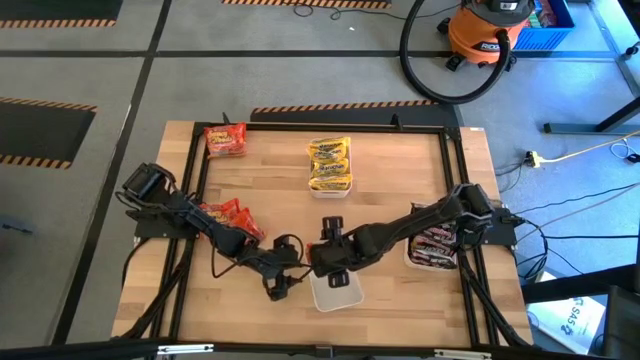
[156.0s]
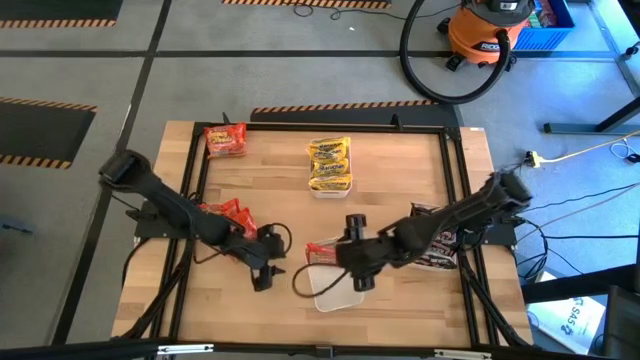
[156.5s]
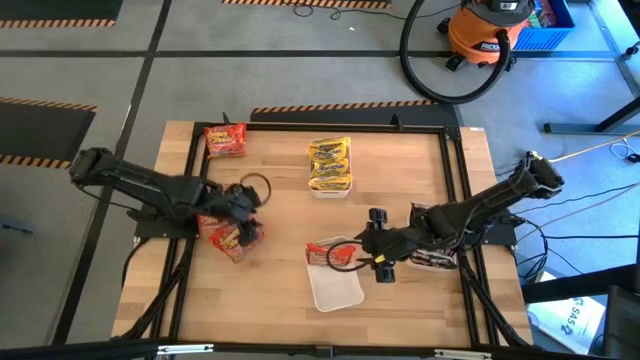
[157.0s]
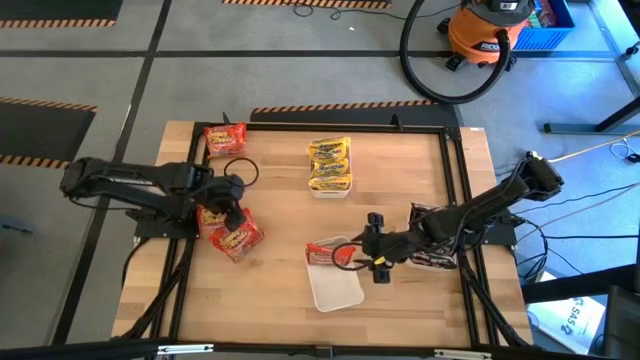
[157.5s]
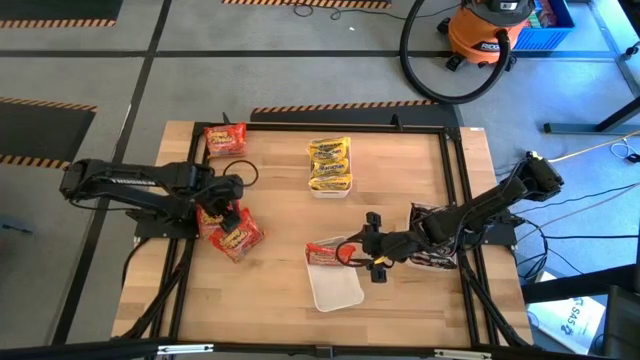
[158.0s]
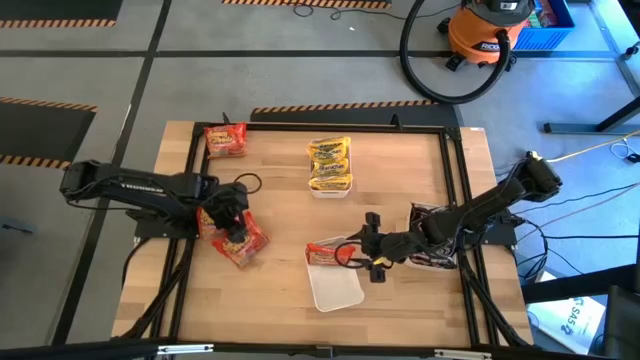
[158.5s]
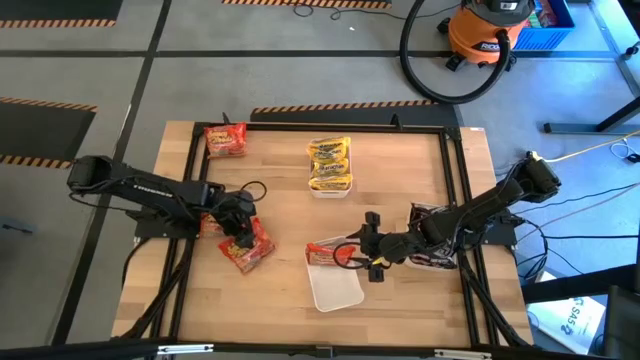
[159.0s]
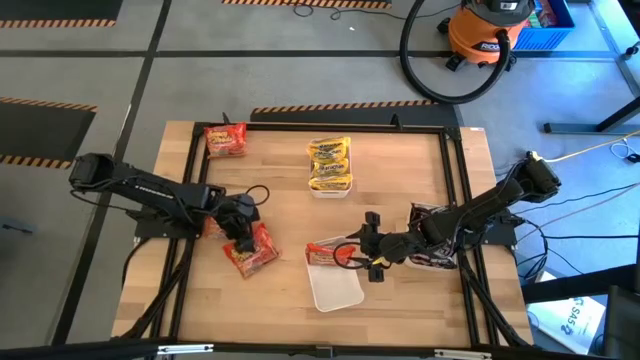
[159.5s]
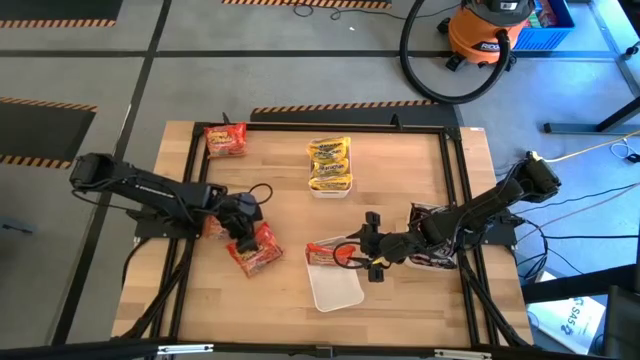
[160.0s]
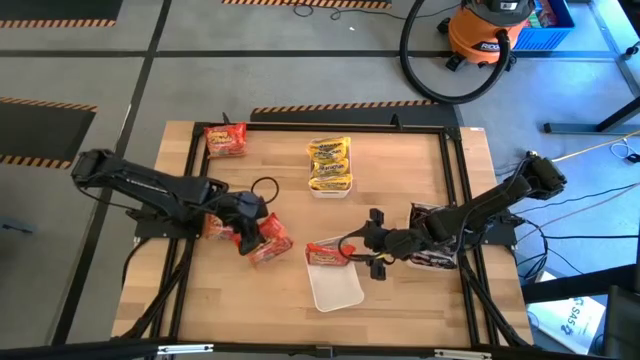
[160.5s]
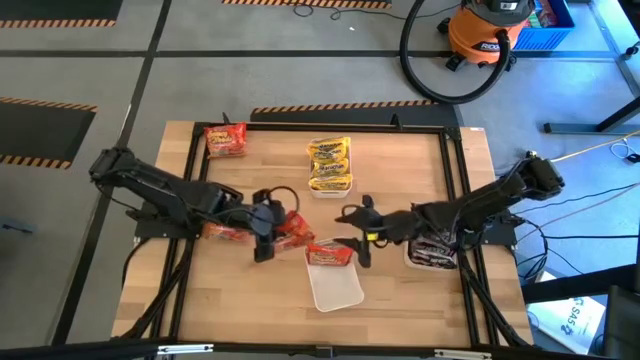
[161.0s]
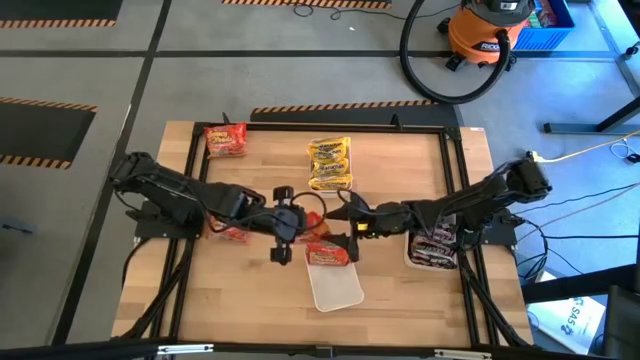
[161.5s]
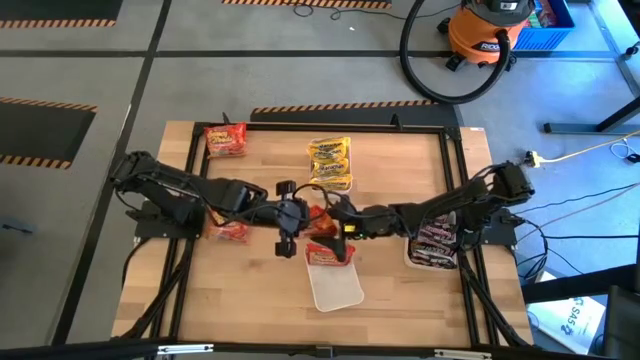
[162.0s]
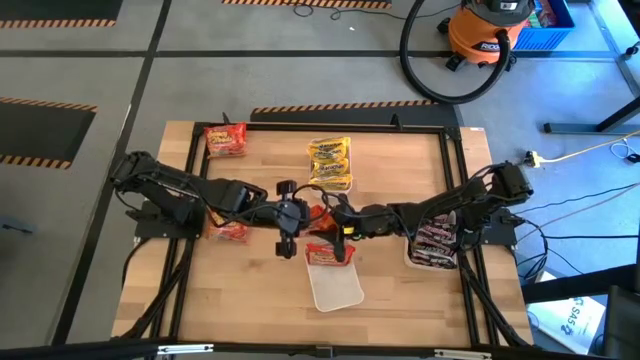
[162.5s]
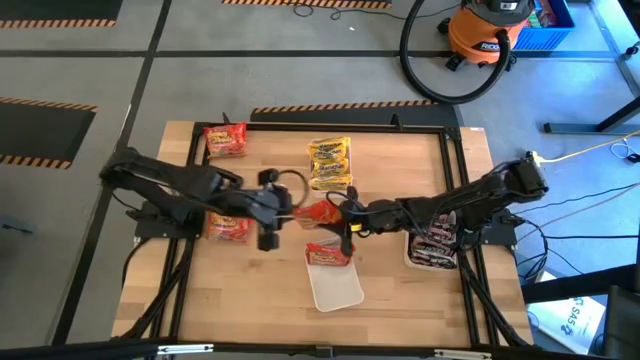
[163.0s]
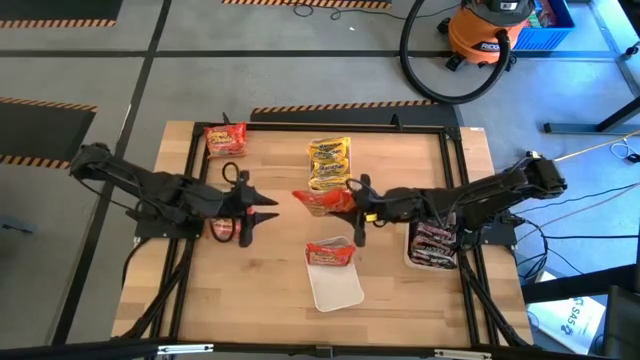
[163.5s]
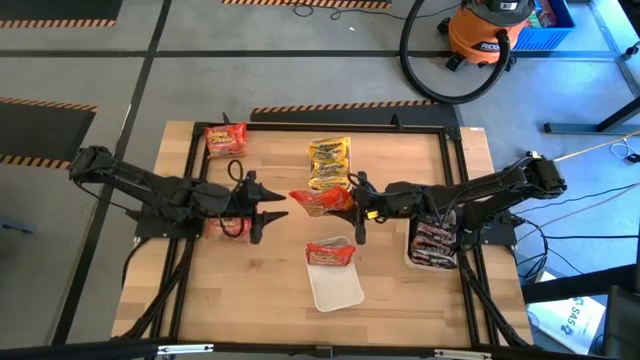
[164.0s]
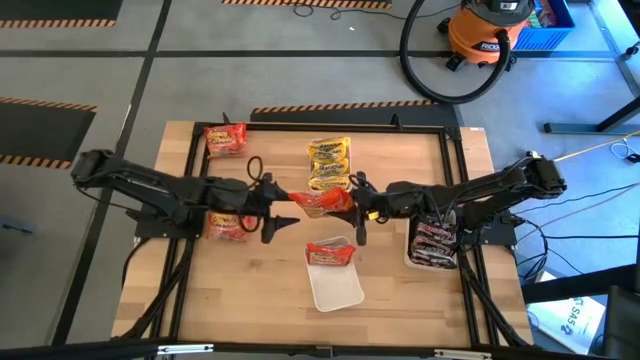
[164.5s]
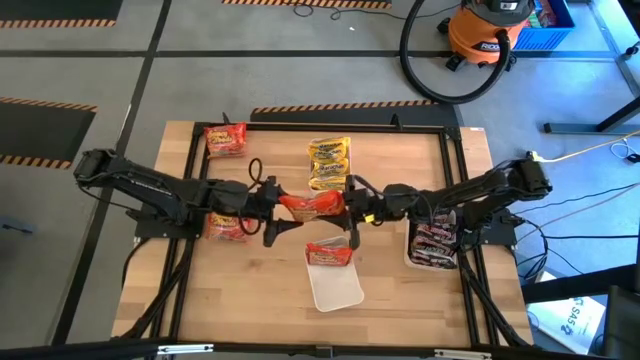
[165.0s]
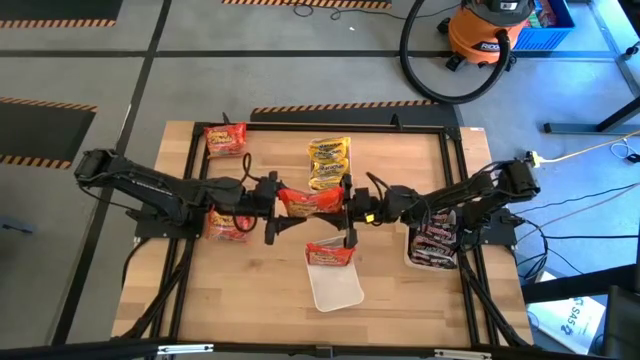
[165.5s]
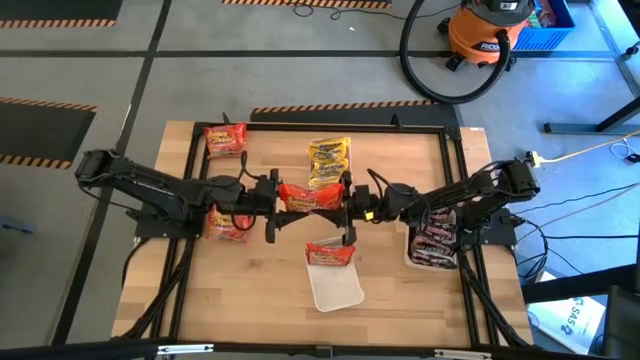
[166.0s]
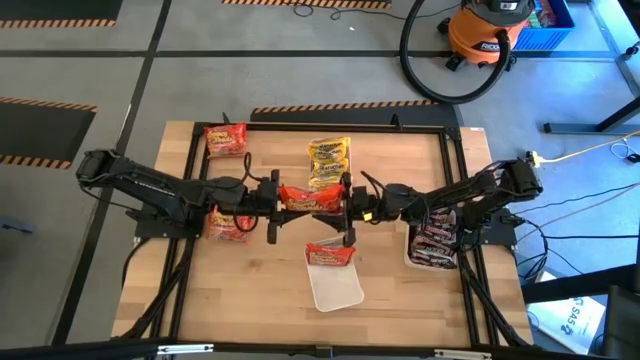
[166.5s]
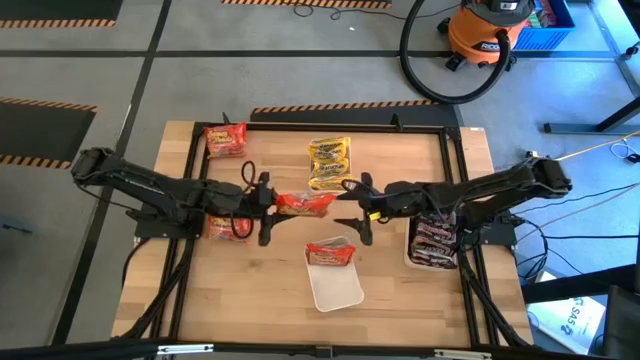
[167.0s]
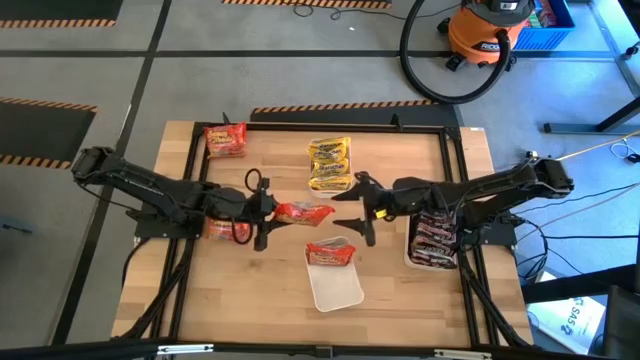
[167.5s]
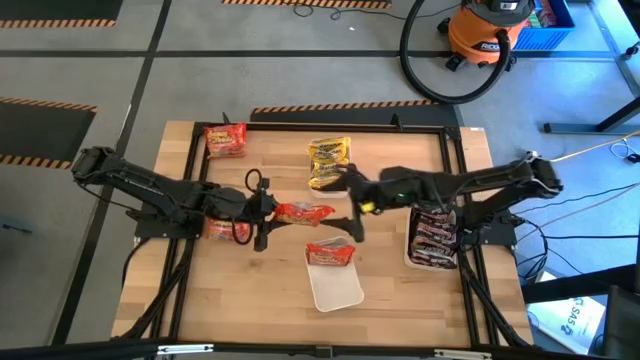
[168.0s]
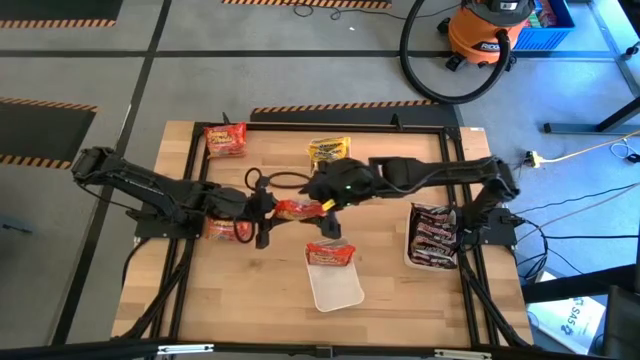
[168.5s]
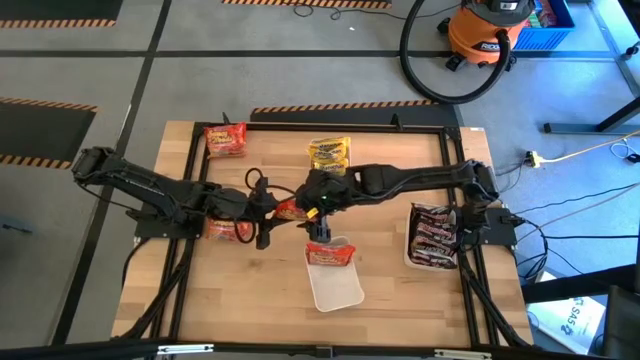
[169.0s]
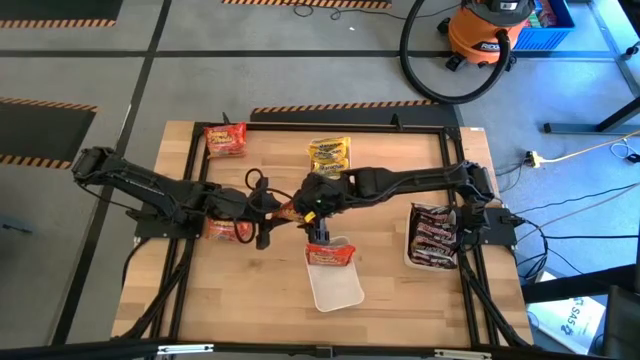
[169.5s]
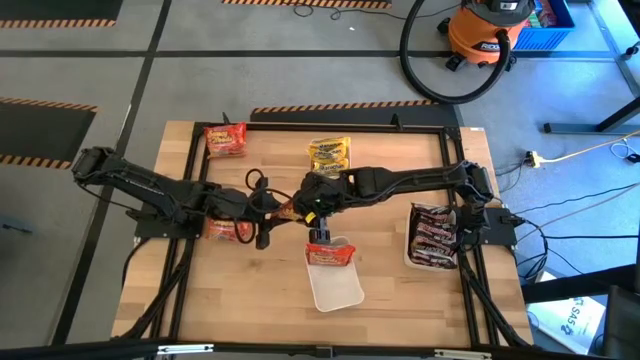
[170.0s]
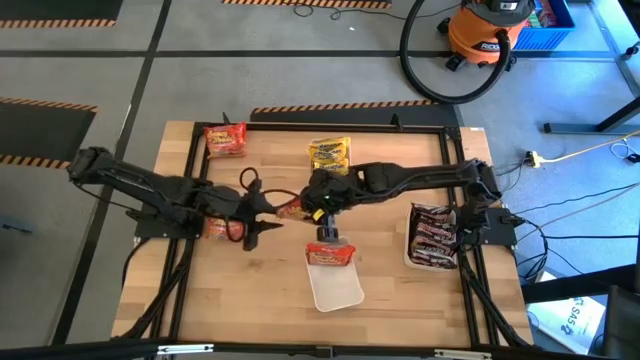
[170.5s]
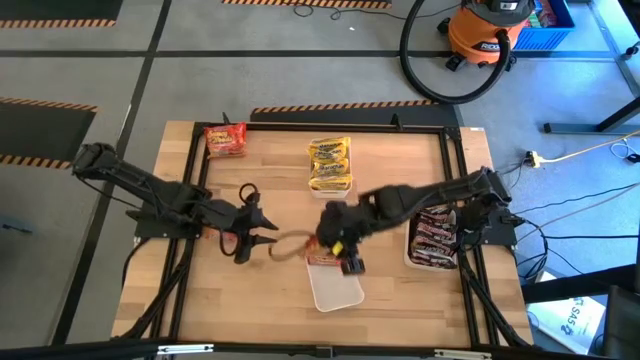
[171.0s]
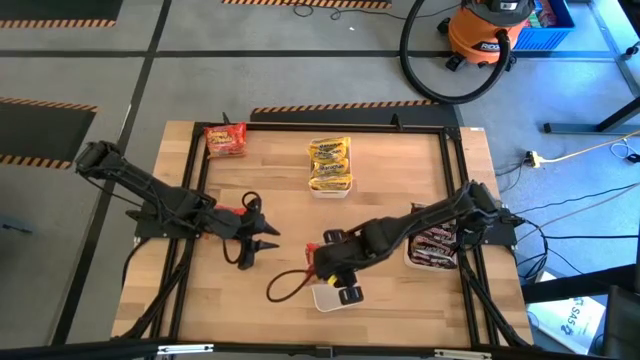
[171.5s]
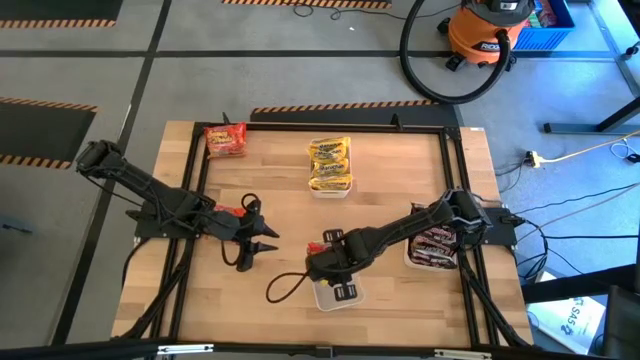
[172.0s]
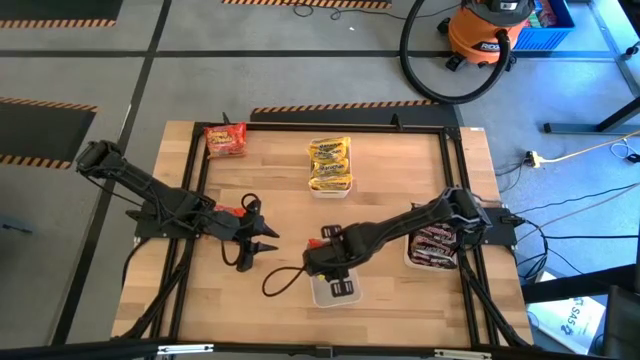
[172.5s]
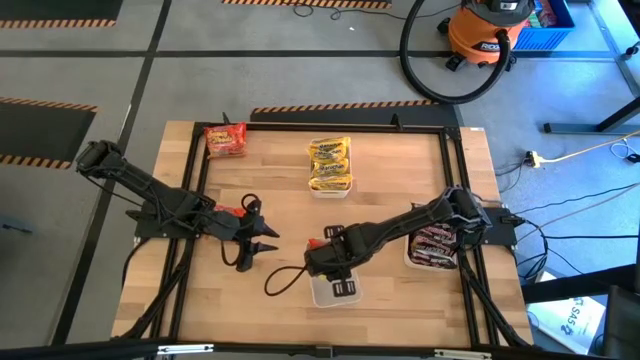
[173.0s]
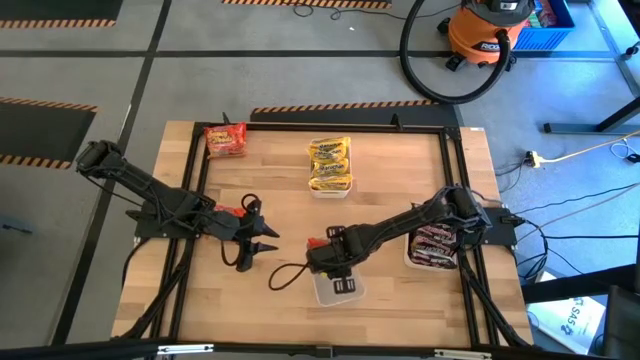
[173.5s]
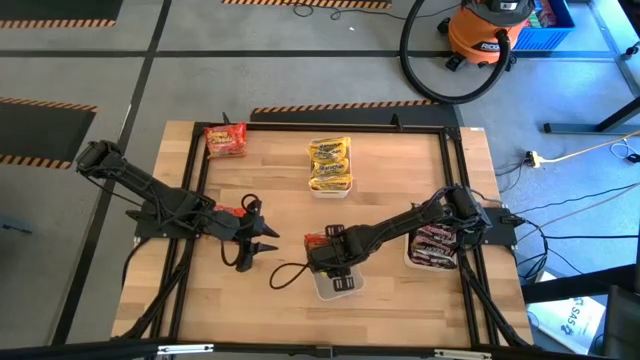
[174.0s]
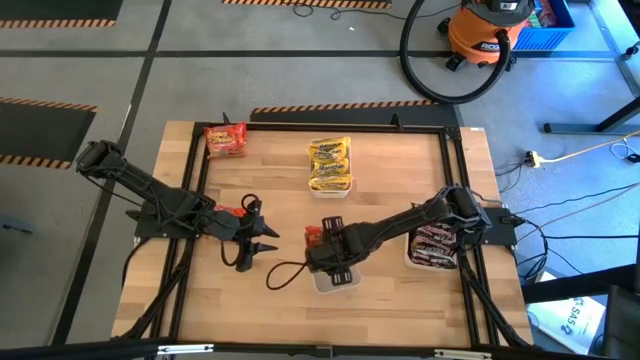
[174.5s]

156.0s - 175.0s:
Task: Sort Maruchan noodles
Put the bottom right orange noodle pack into bottom white bin

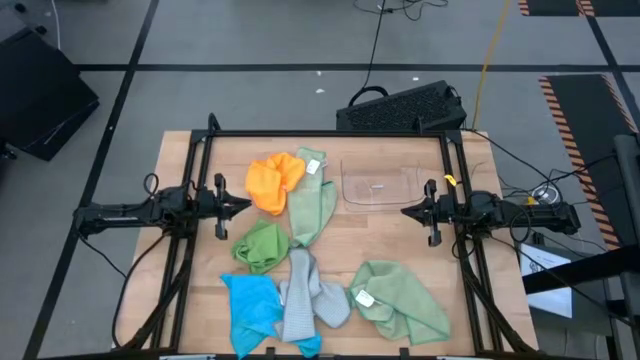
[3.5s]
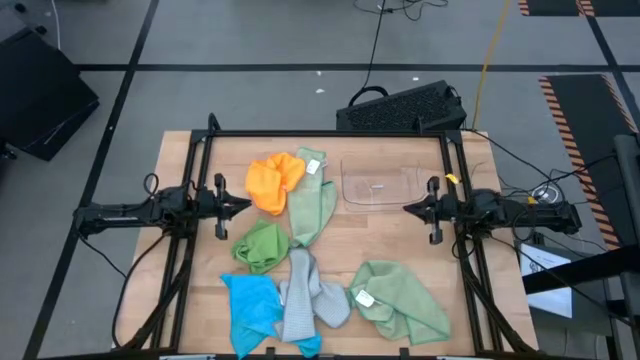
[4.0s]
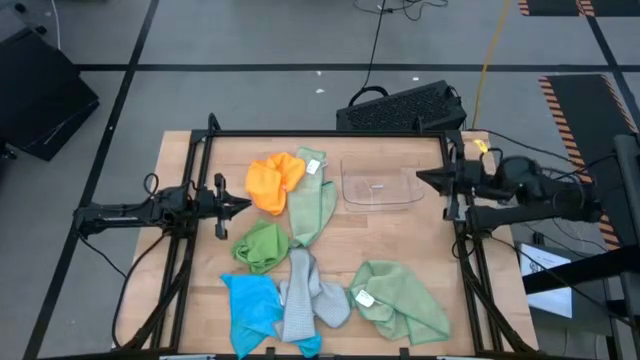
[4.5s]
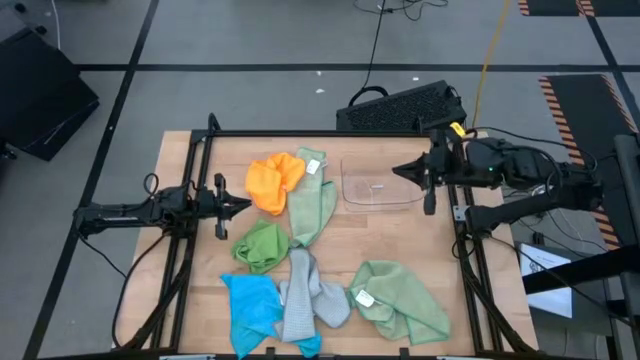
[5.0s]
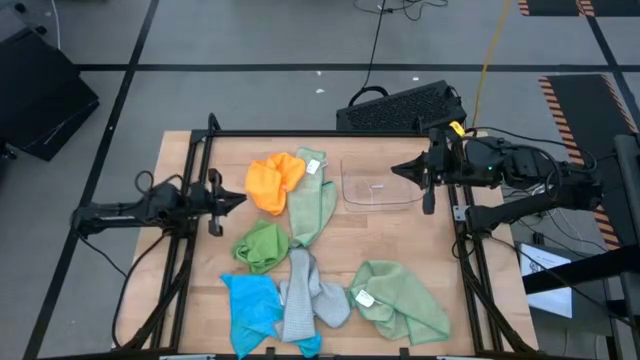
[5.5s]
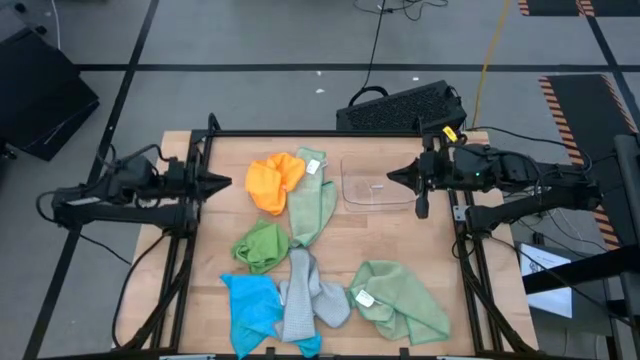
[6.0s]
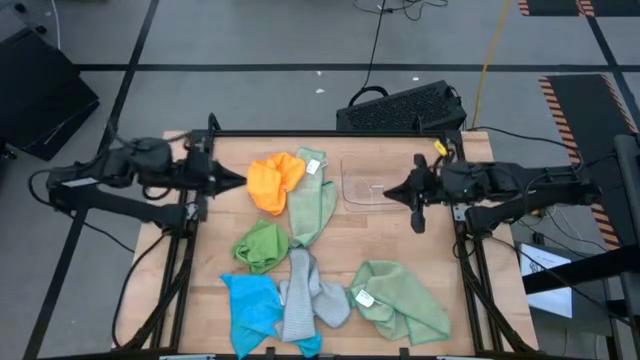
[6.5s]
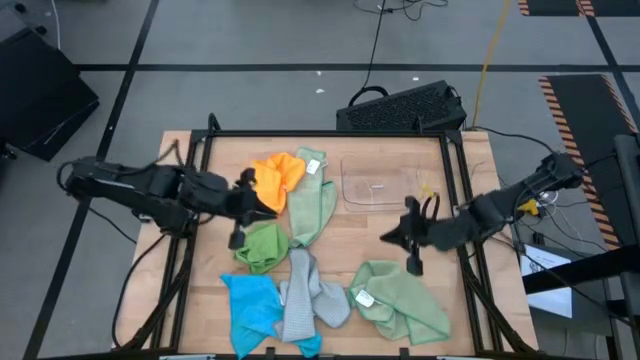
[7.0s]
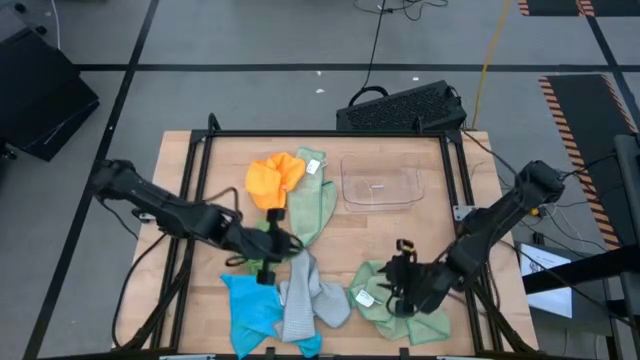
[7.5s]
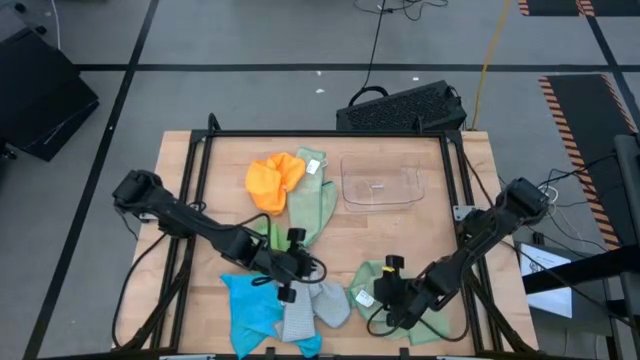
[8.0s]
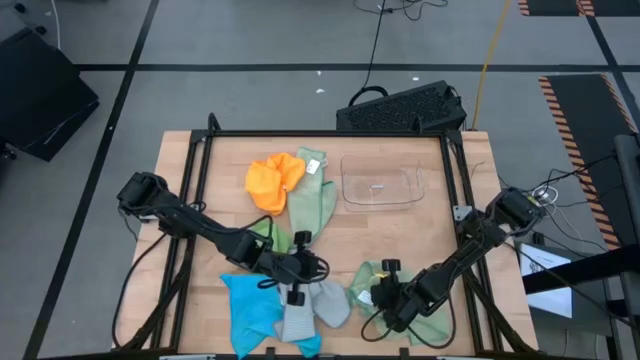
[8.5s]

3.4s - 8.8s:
Task: Fold microfiber towels
Fold the bottom light green microfiber towel
